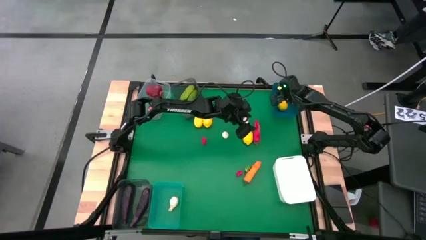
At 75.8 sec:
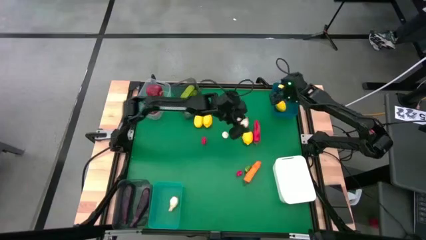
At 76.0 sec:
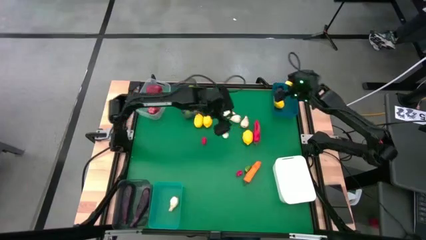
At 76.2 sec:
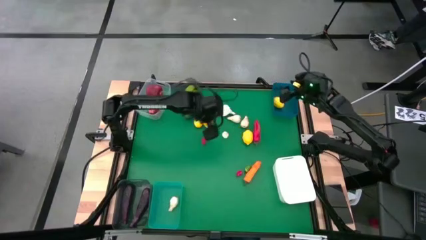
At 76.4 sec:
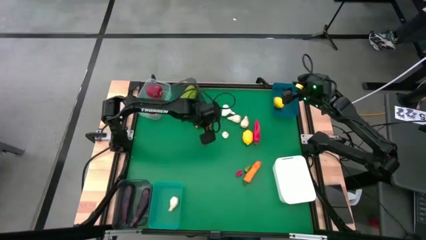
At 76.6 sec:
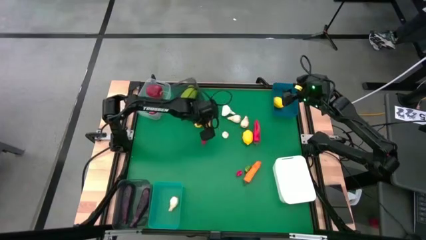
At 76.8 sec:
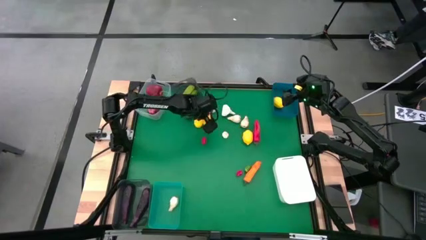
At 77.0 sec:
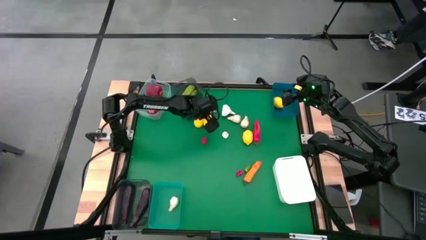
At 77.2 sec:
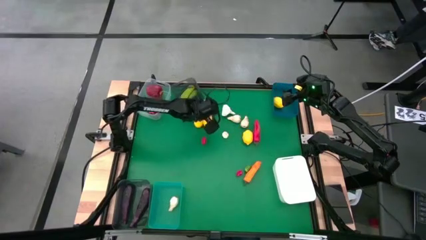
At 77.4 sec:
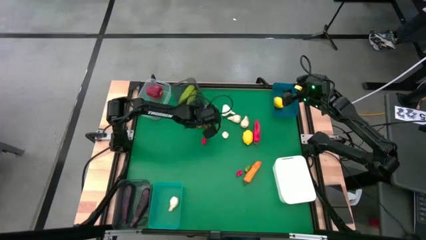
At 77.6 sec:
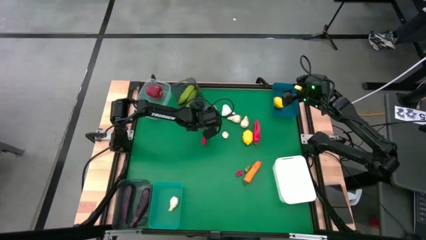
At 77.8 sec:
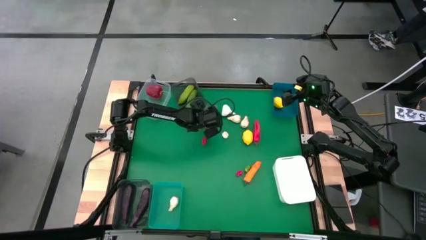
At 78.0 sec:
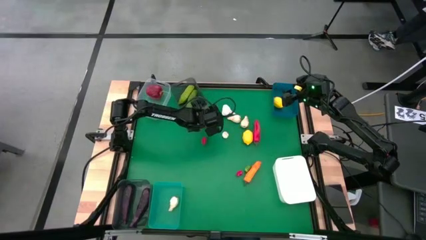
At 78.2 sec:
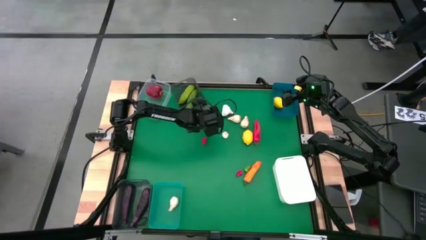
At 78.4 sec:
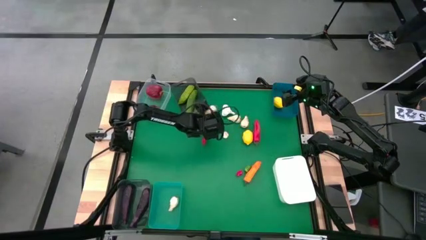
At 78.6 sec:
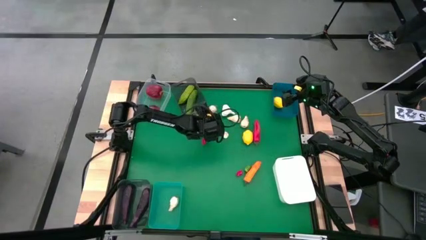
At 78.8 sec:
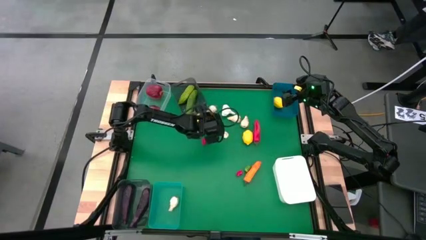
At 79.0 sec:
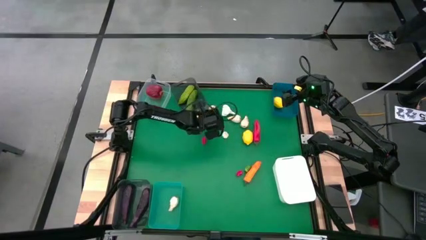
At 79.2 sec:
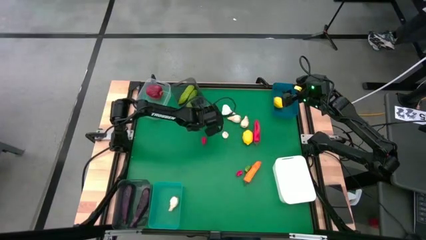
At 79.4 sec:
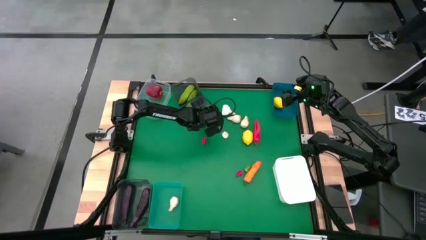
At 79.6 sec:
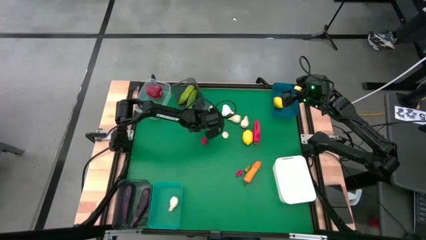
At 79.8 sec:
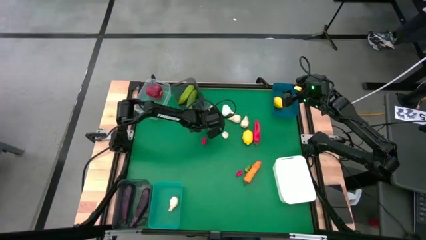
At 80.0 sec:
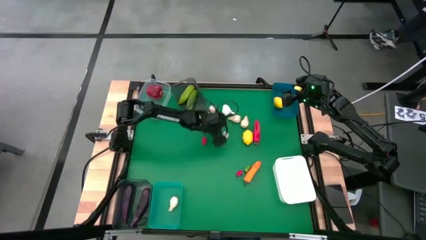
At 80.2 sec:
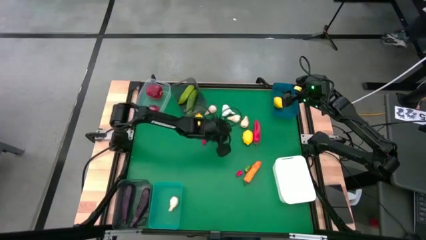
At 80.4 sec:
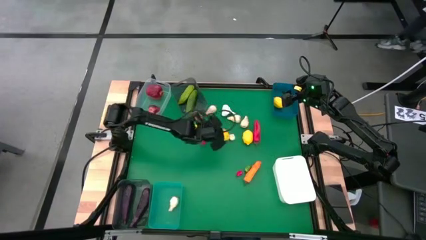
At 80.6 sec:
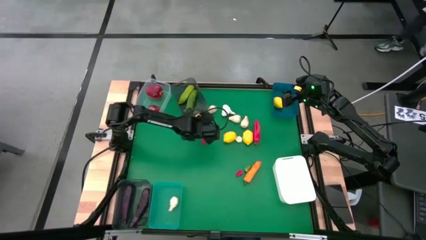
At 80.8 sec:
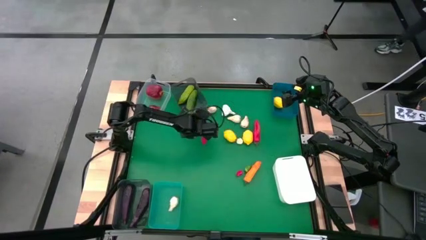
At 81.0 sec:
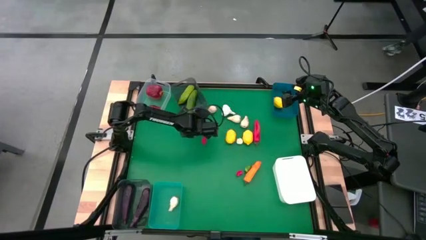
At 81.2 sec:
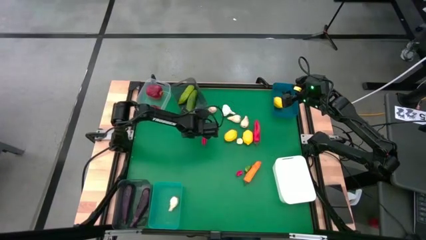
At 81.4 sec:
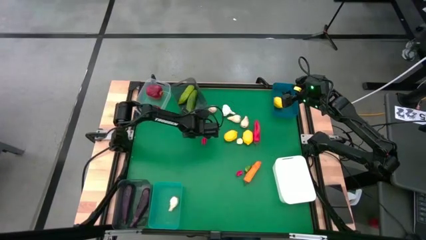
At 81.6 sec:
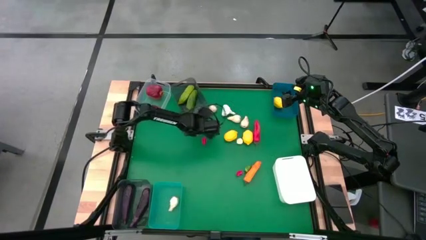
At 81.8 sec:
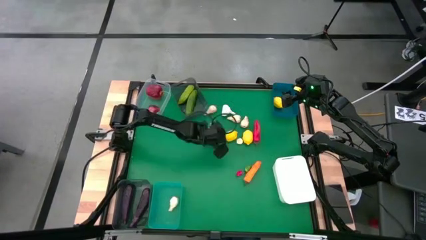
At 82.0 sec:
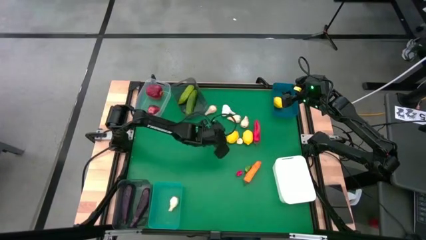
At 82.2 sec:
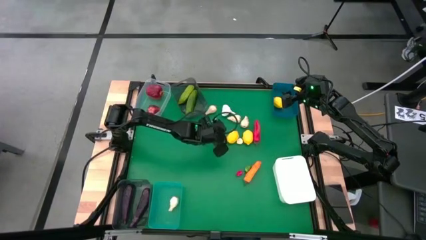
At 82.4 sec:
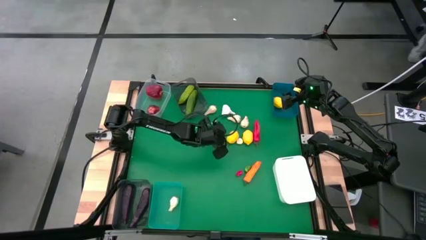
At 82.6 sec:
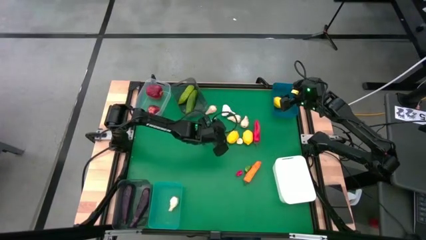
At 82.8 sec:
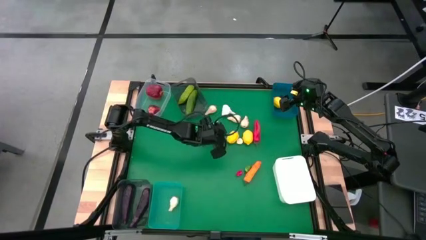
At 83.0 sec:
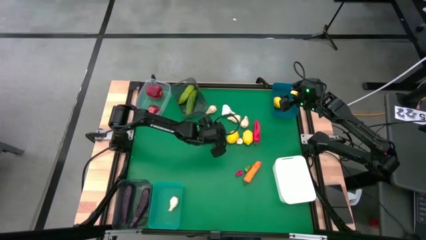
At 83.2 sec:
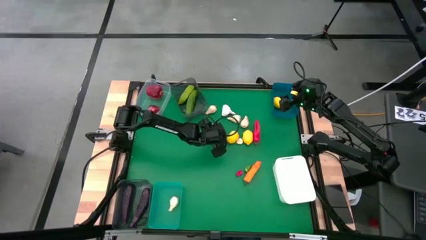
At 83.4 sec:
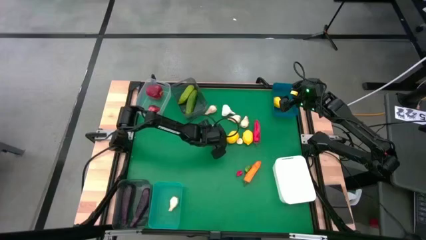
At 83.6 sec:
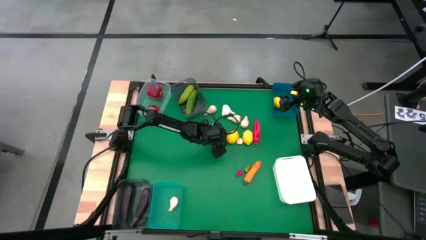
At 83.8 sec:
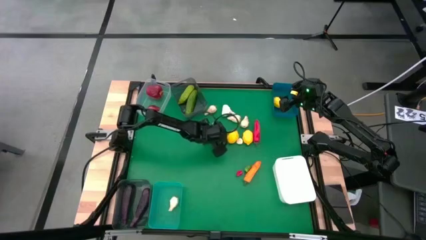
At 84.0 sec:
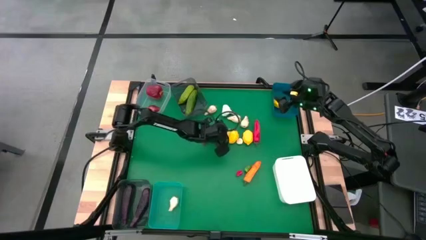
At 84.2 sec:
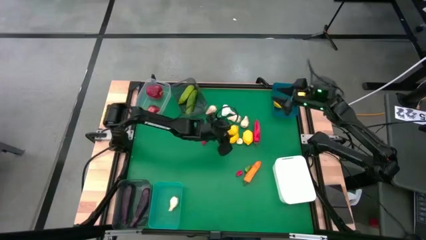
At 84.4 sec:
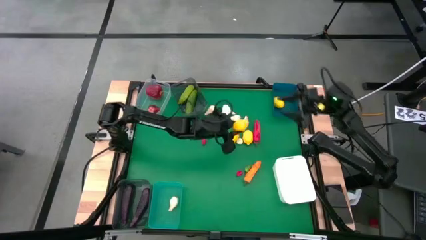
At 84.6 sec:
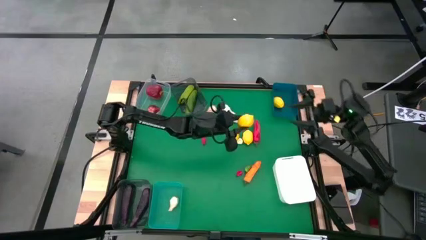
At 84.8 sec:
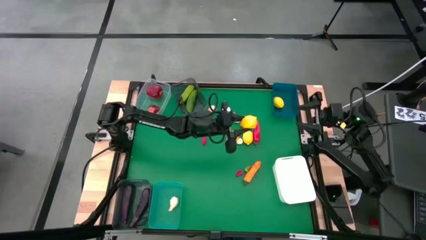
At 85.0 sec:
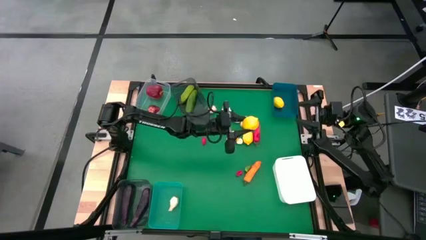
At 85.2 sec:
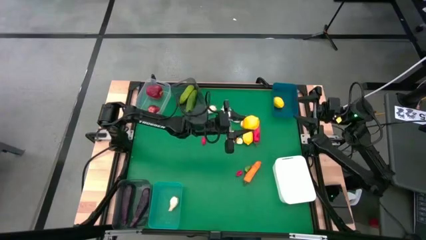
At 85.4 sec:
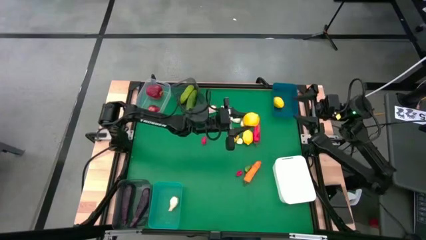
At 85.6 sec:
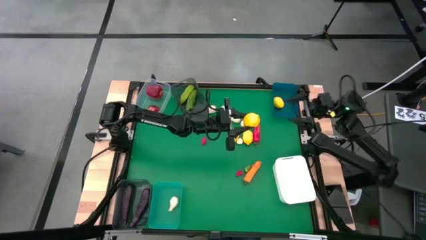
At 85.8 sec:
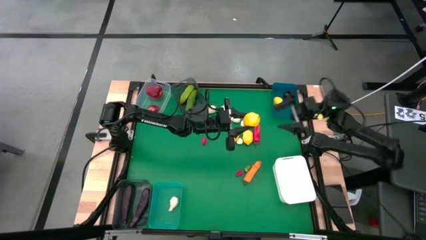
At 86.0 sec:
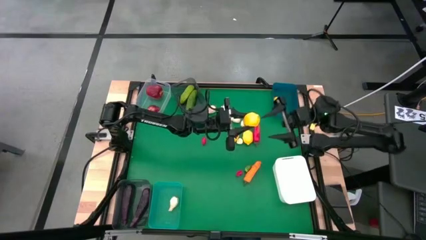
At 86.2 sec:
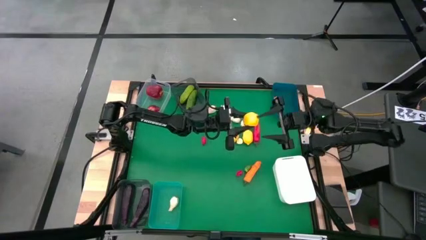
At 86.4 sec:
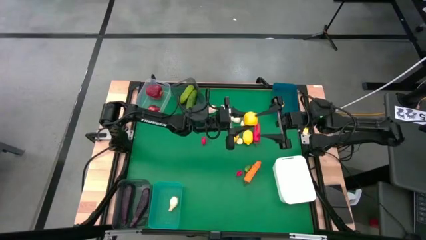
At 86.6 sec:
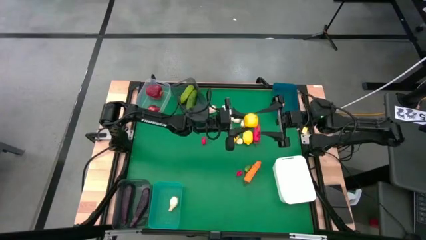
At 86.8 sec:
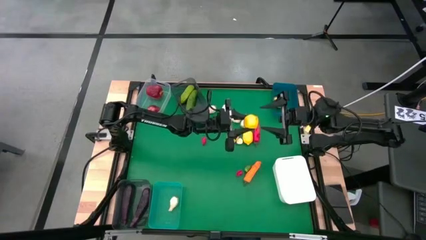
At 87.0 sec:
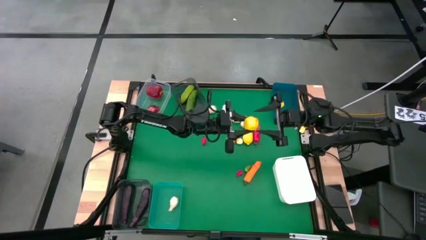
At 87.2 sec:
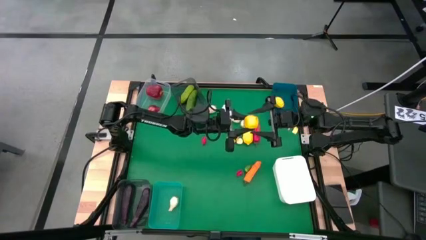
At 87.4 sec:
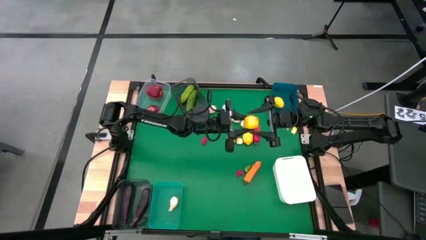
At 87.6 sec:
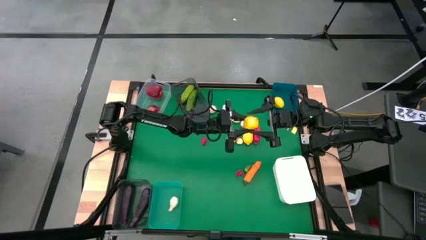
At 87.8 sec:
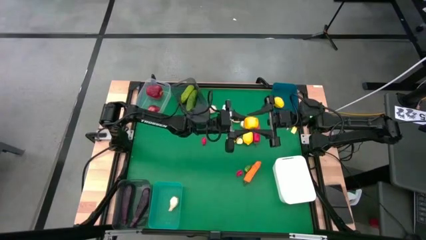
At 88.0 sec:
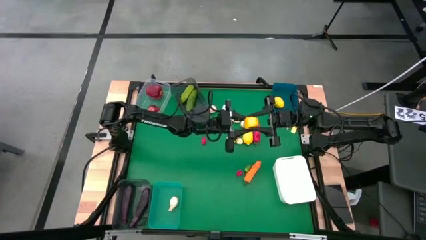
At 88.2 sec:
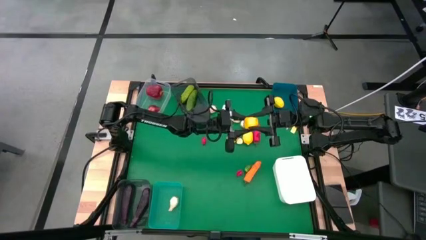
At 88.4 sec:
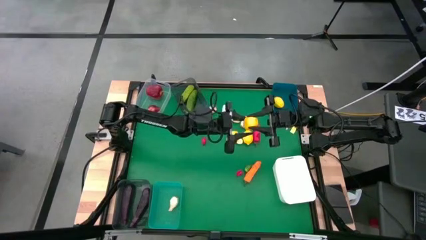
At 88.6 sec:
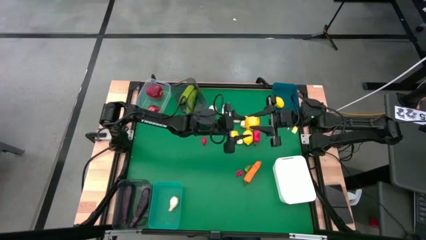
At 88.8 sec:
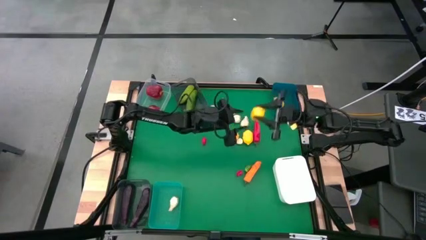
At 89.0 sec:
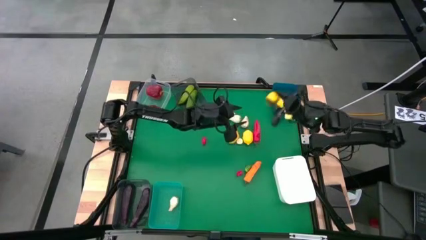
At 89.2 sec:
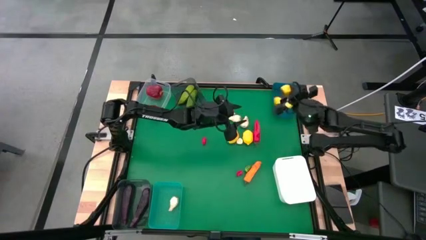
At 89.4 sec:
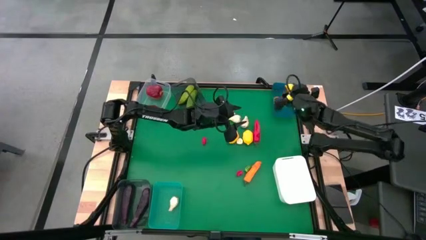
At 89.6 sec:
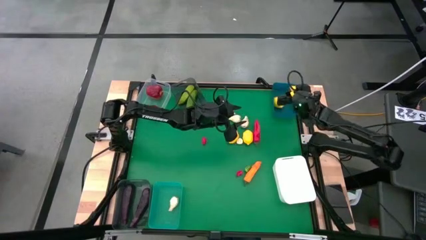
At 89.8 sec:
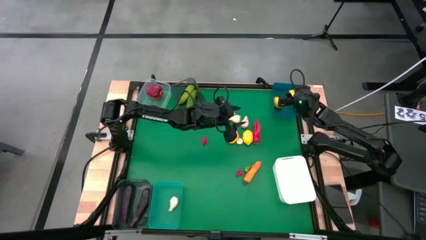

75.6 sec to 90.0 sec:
Task: Sort produce into baskets
Put the lemon into the blue bin
